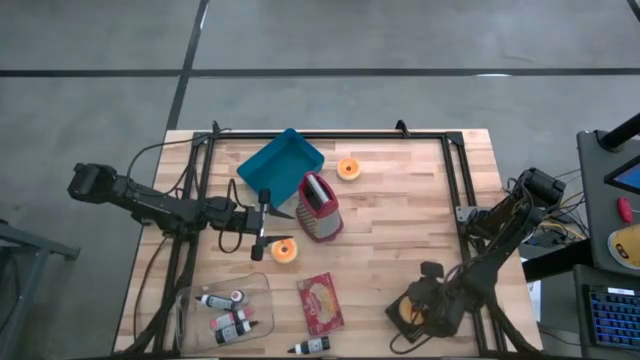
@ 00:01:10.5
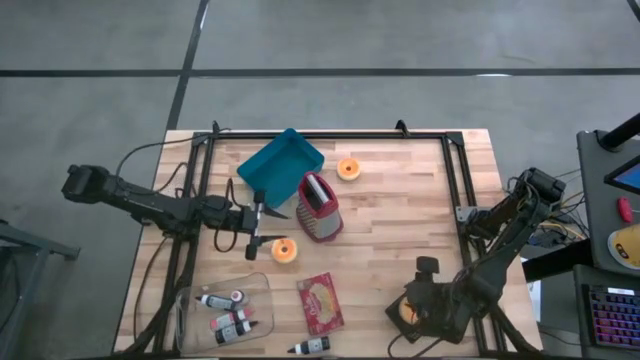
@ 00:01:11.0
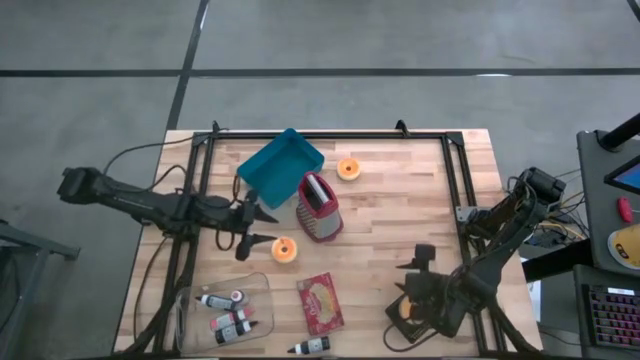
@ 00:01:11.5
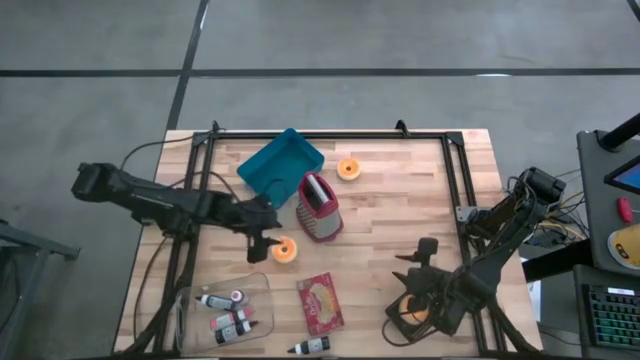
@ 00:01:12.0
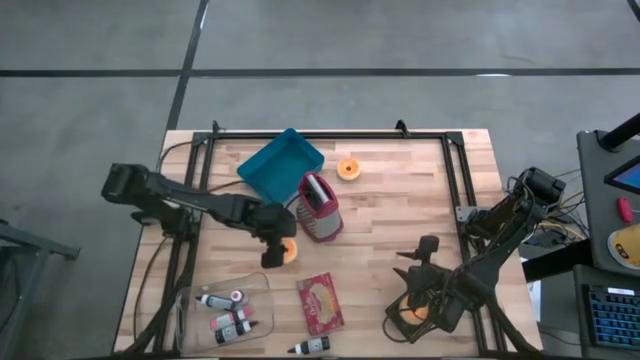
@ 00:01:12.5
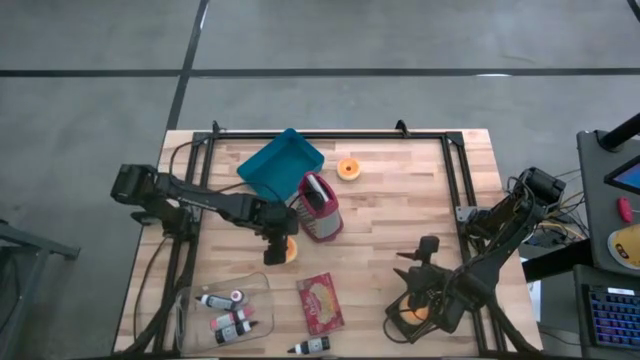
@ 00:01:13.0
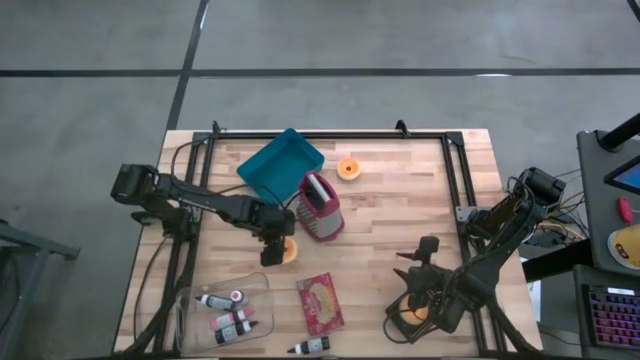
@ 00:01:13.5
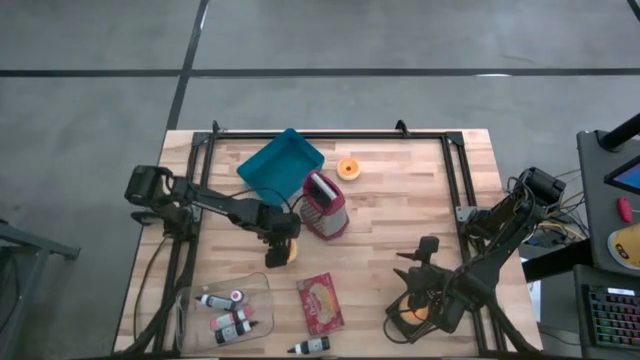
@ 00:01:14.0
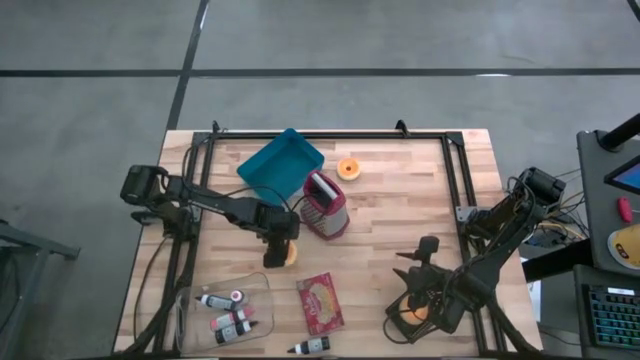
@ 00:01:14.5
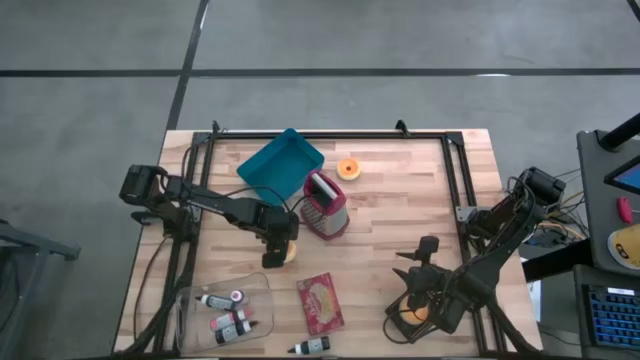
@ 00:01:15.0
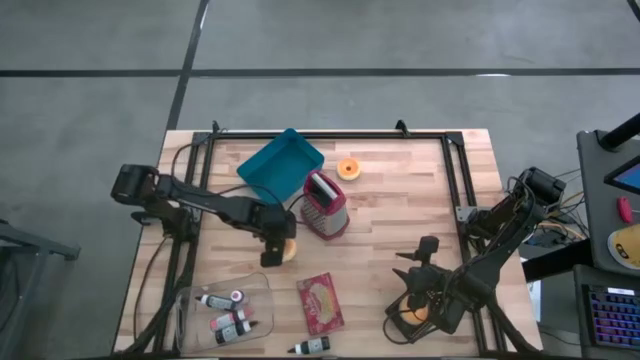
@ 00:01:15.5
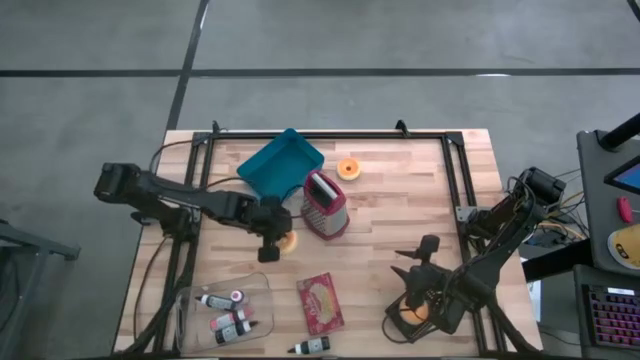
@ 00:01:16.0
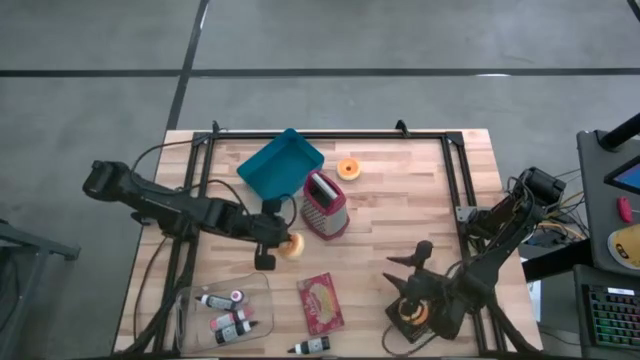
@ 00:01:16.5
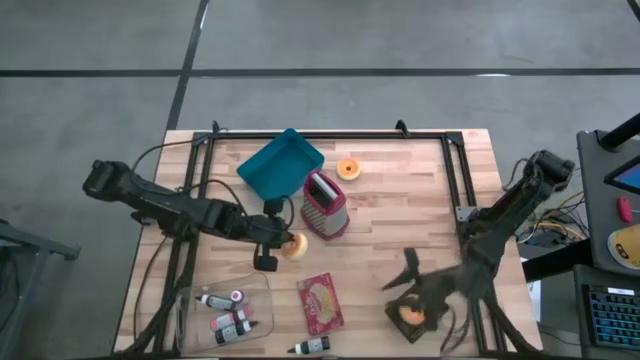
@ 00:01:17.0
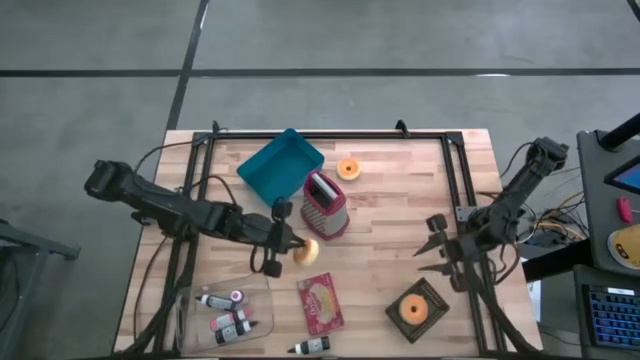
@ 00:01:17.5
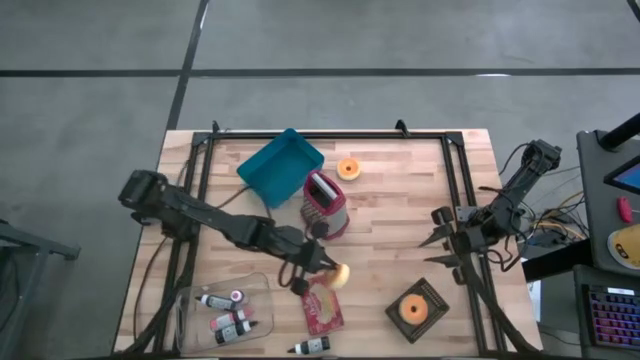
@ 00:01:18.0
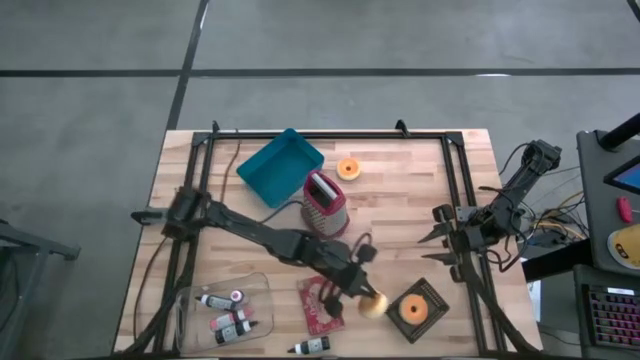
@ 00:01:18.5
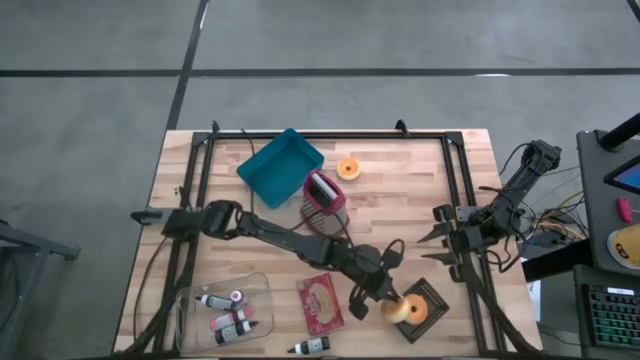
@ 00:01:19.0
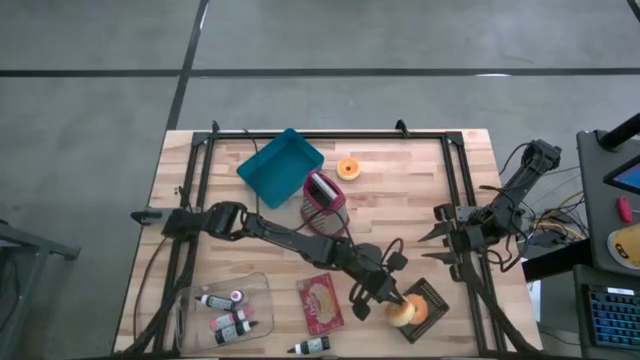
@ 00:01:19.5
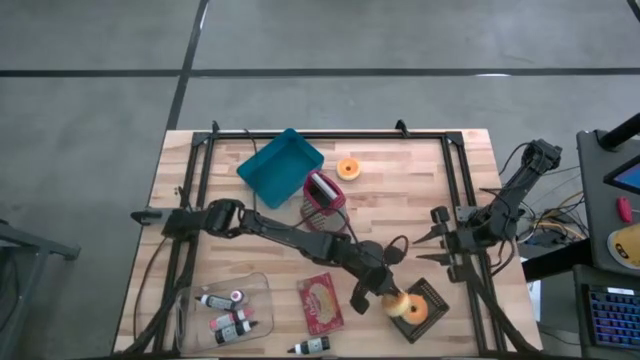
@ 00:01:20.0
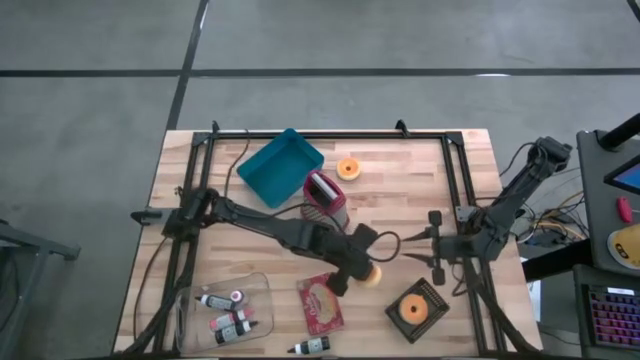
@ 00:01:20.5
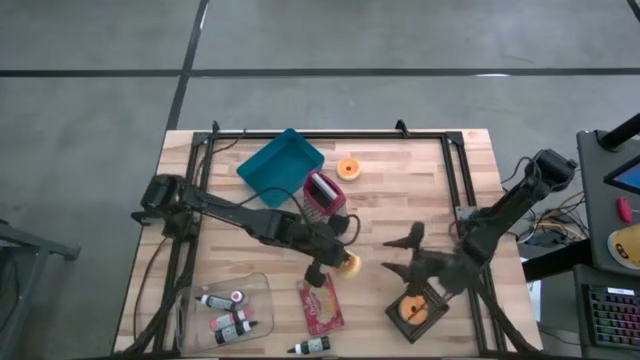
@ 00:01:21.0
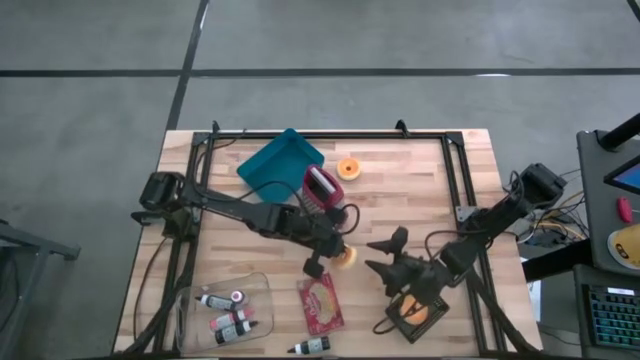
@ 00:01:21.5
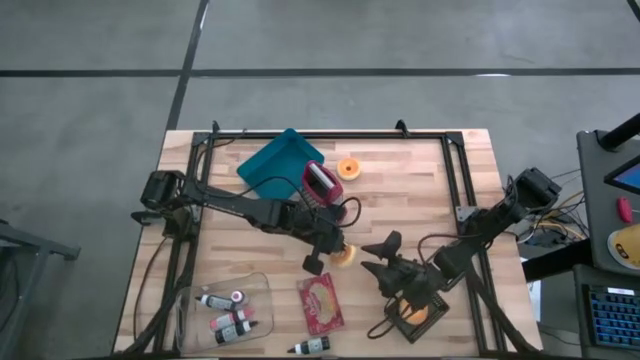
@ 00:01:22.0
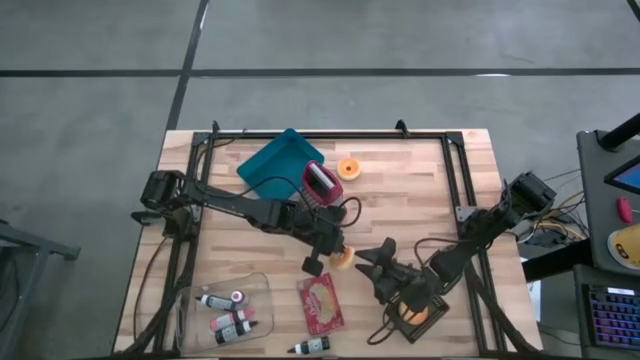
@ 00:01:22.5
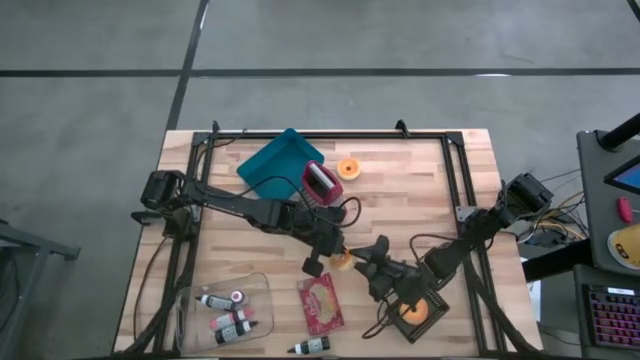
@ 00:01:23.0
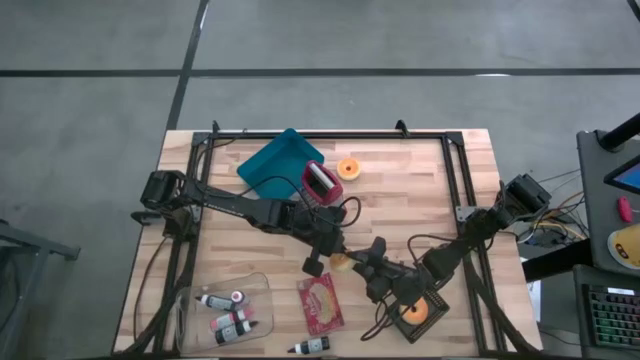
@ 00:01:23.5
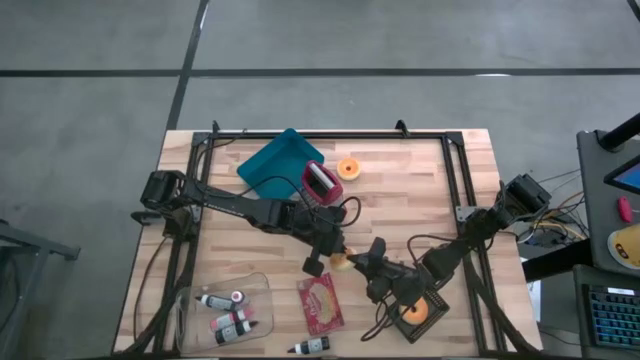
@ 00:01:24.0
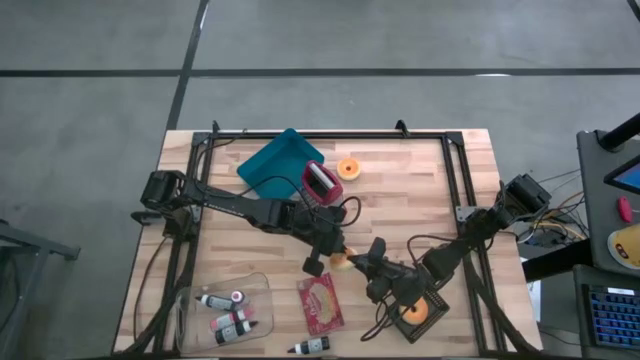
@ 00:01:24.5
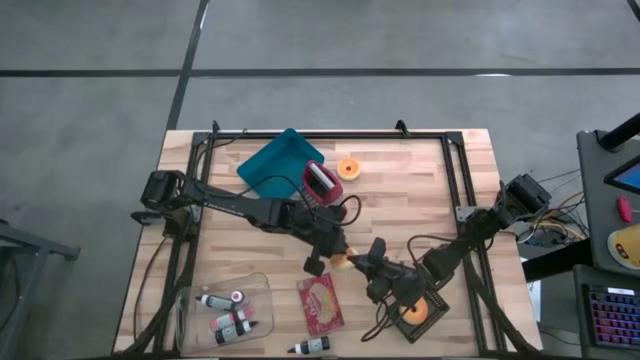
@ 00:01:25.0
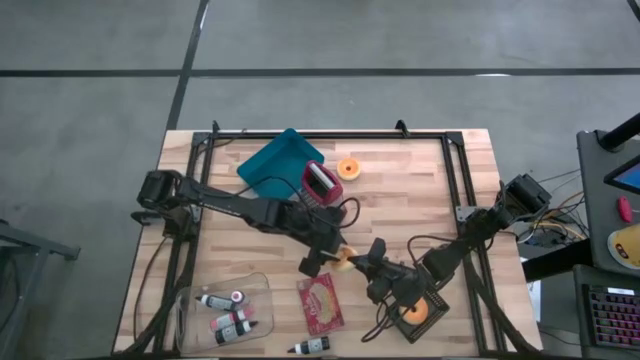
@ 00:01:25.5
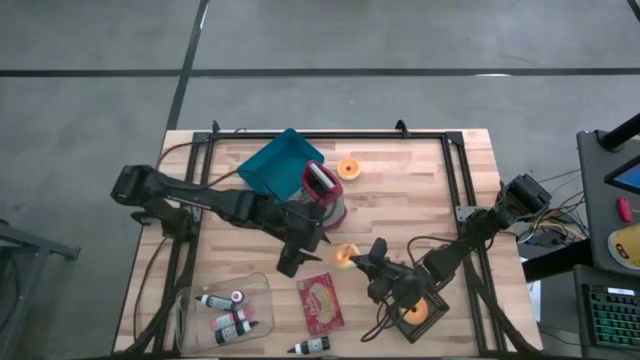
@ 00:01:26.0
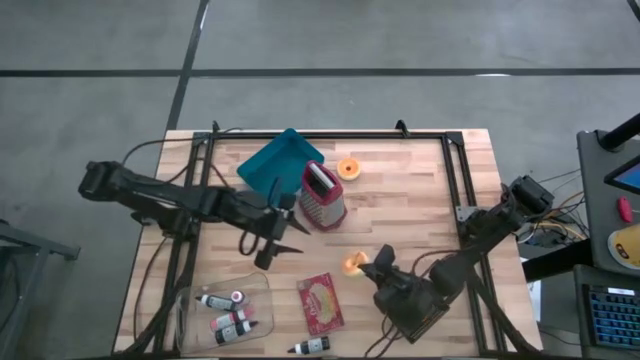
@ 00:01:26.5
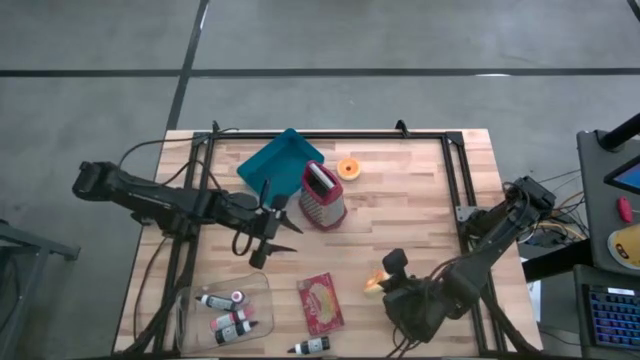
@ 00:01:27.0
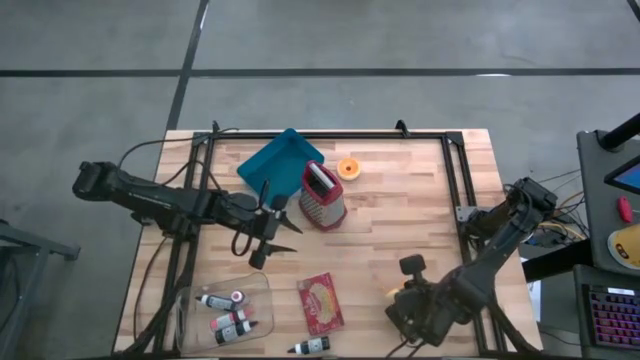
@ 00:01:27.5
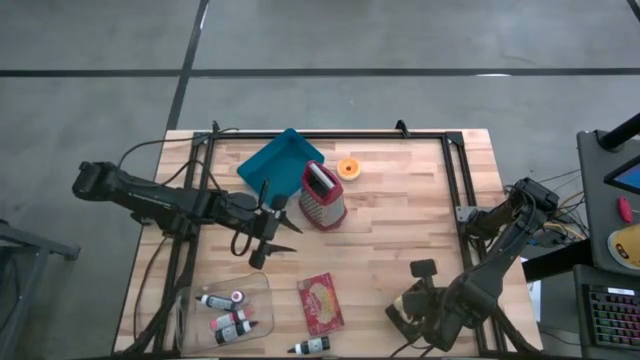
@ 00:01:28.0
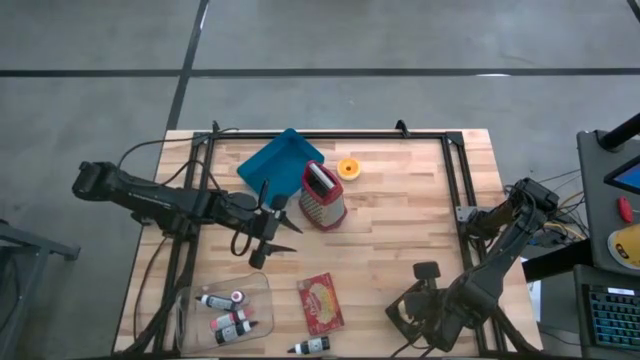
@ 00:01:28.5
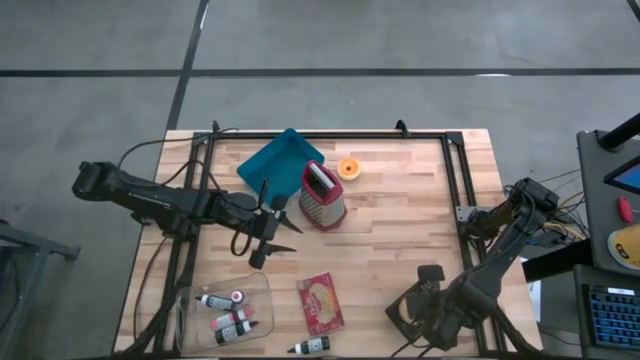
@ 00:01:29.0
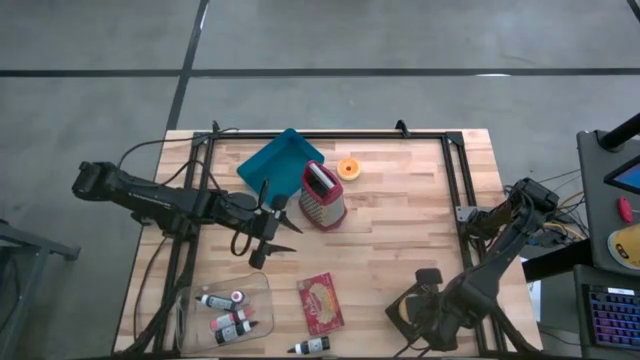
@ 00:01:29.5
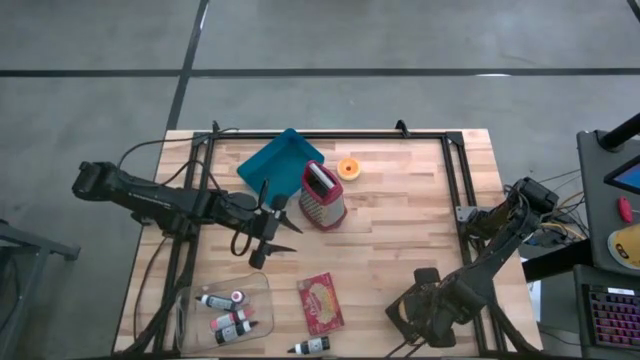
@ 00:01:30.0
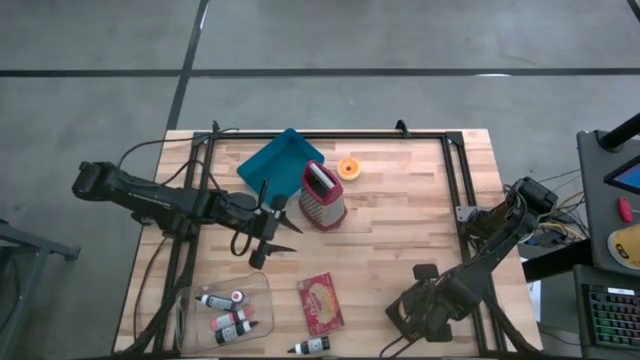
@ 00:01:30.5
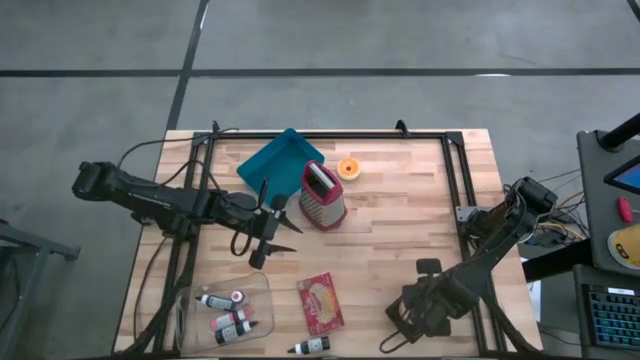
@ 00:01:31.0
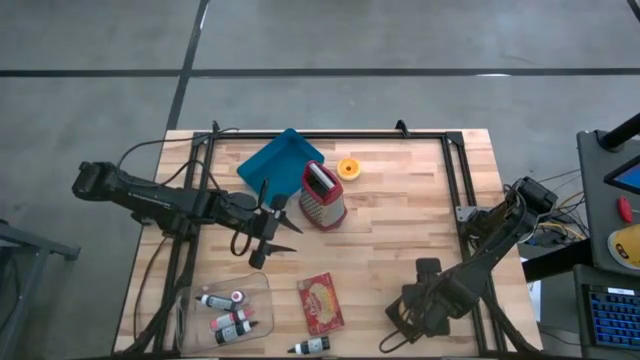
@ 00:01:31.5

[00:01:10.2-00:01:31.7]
Put the bottom orange donut into the black bin
